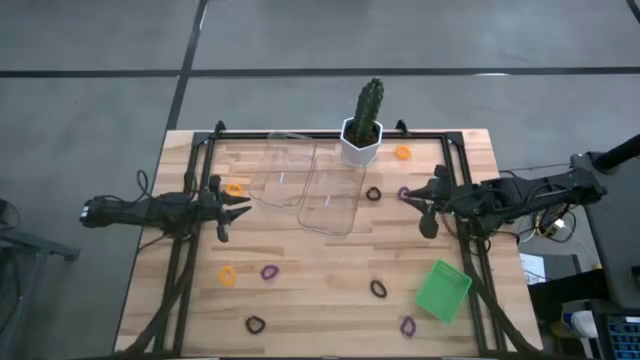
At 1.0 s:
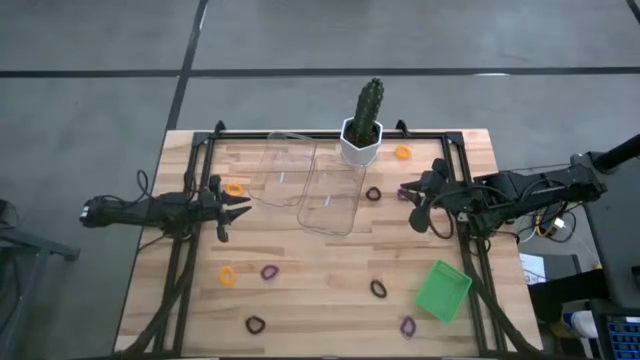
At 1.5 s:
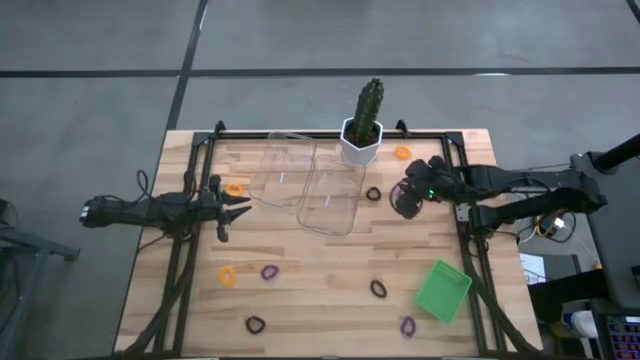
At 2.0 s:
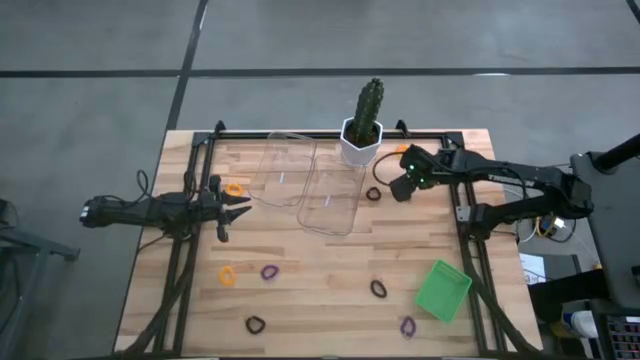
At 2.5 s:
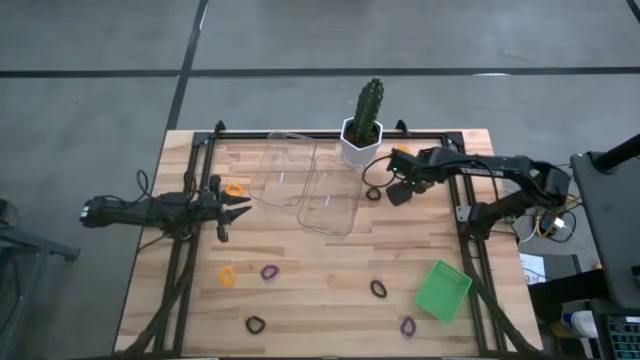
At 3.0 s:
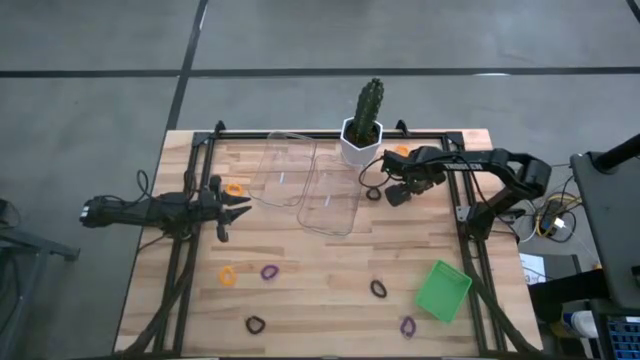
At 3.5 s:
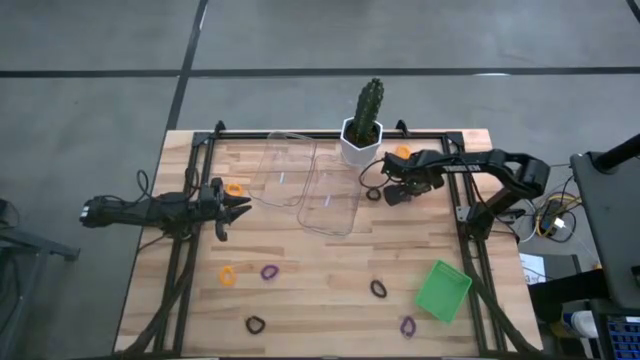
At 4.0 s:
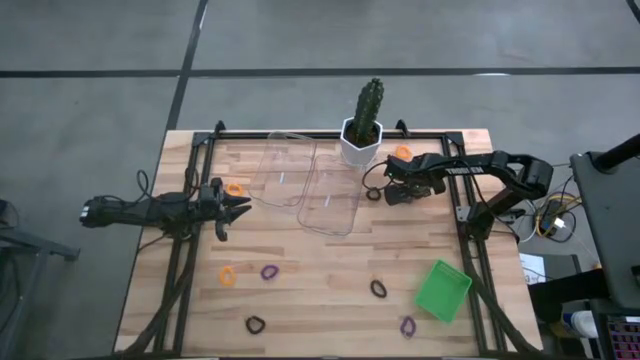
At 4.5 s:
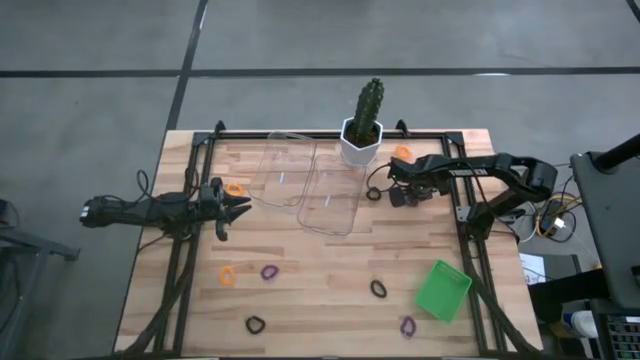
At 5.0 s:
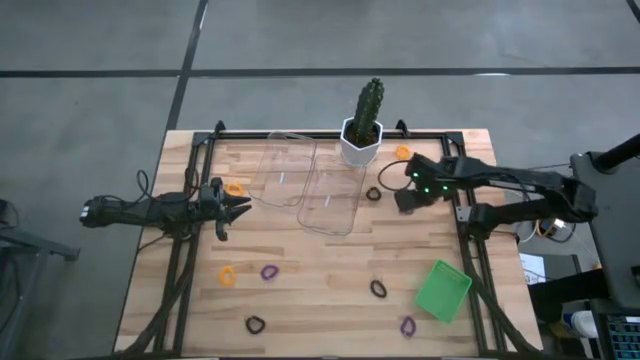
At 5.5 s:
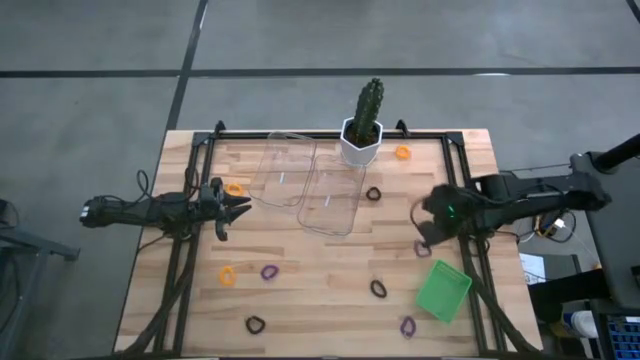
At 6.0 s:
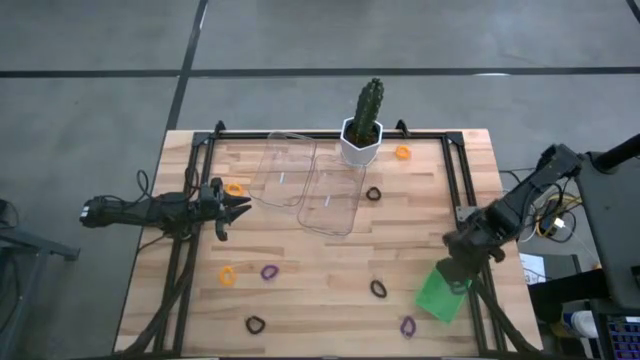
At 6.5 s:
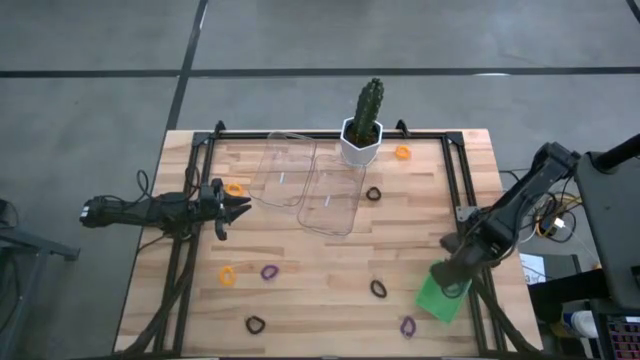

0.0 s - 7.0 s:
Task: Sort items
Put the top right purple keychain into the green bin

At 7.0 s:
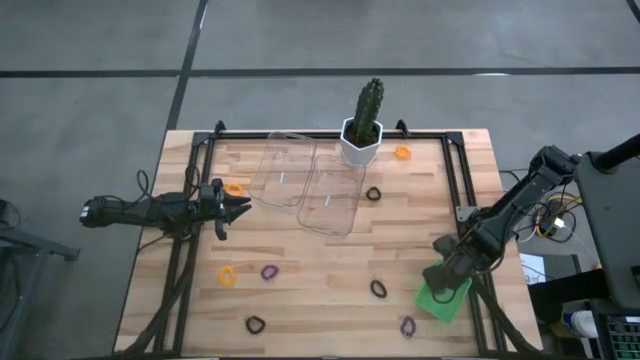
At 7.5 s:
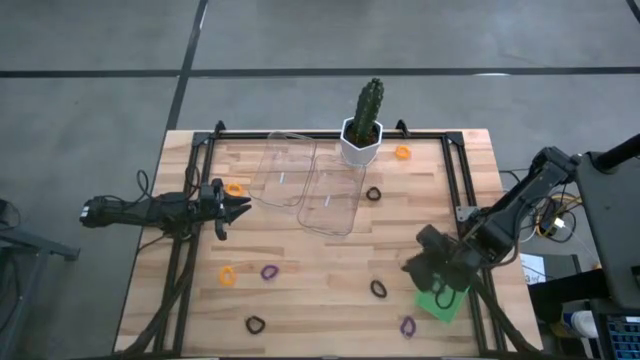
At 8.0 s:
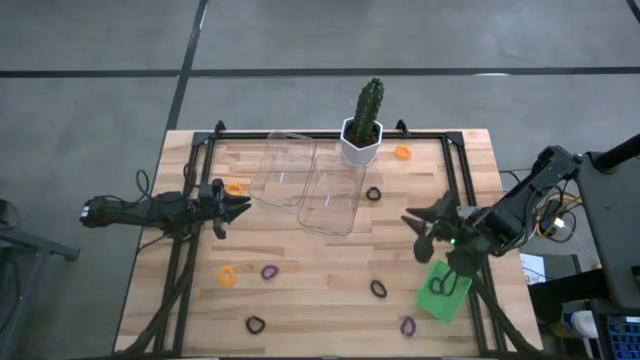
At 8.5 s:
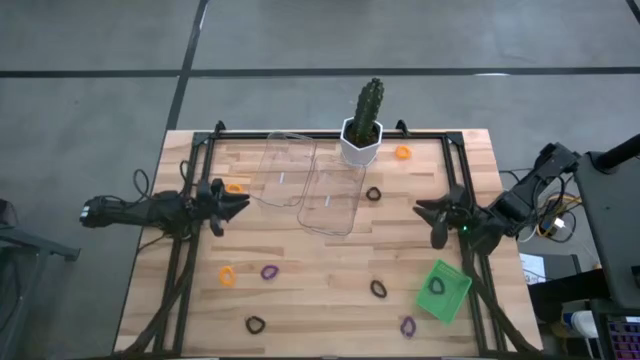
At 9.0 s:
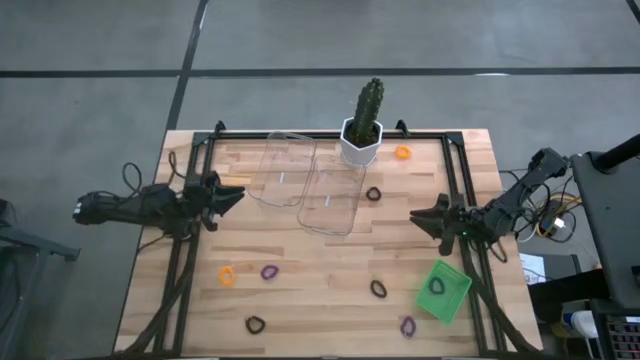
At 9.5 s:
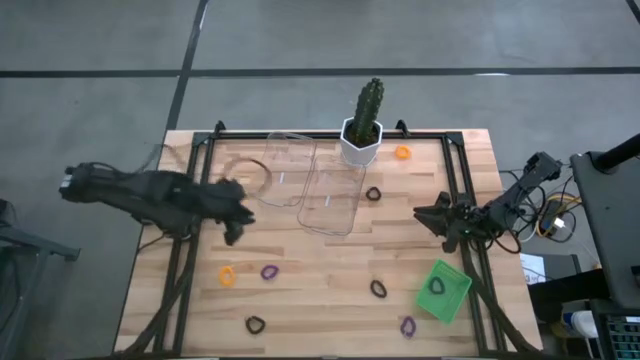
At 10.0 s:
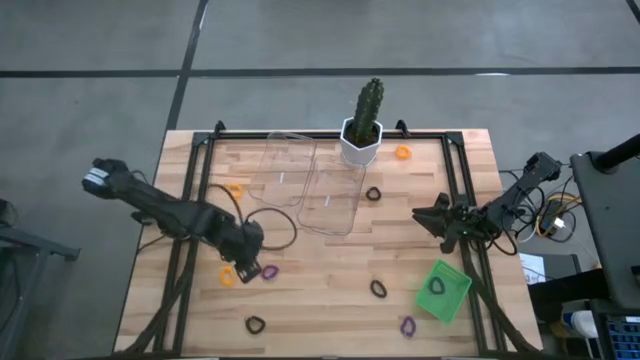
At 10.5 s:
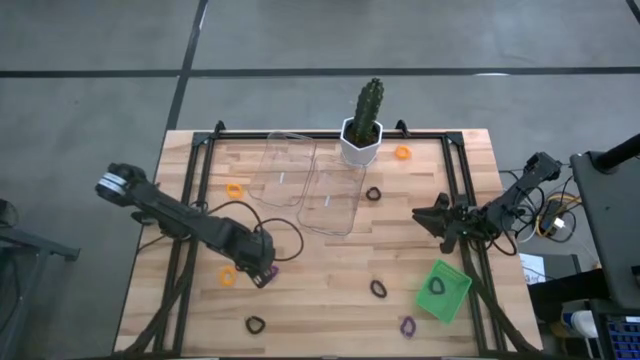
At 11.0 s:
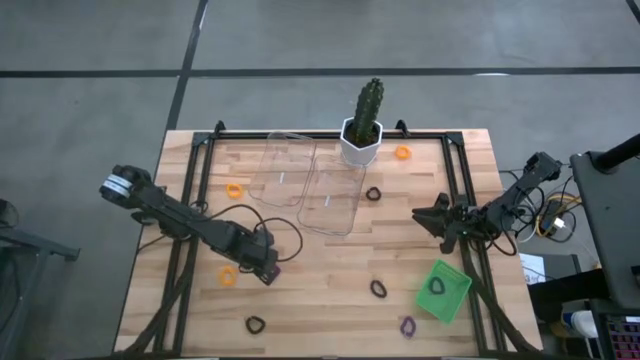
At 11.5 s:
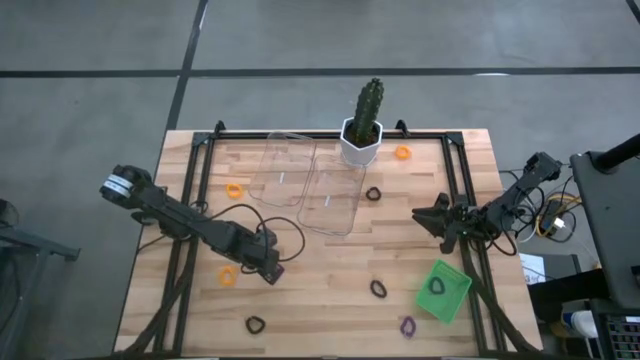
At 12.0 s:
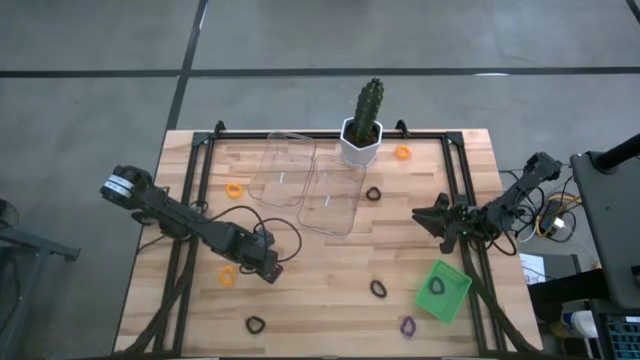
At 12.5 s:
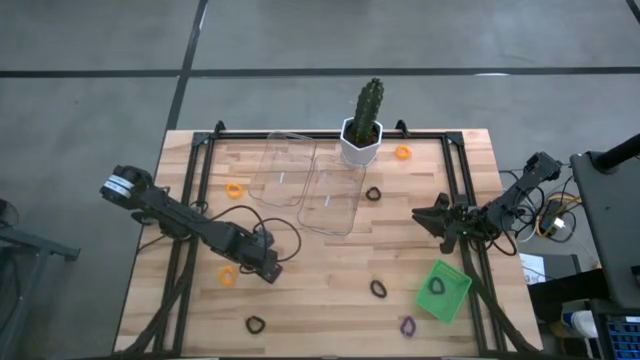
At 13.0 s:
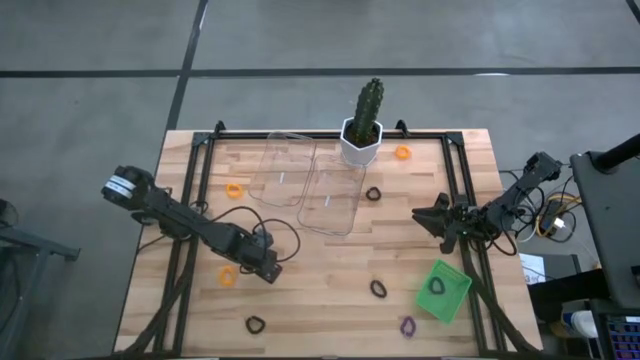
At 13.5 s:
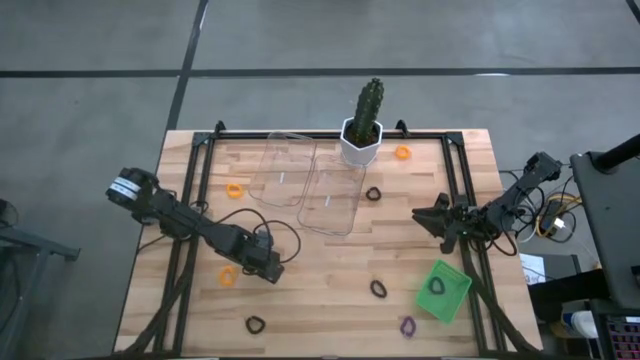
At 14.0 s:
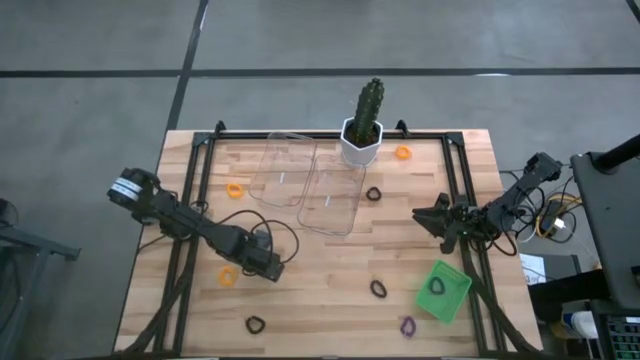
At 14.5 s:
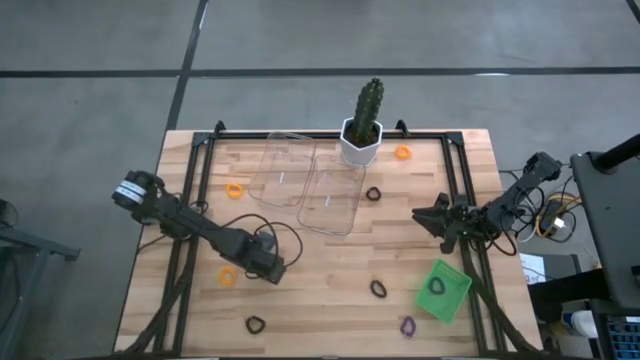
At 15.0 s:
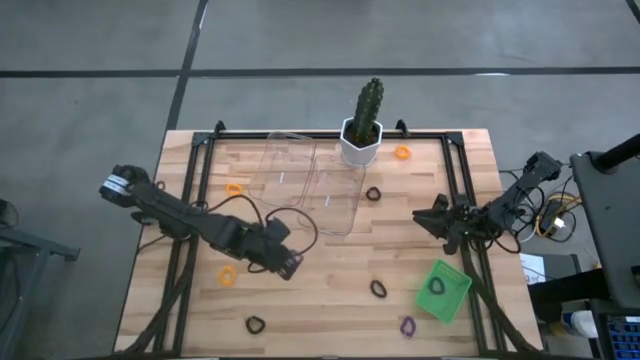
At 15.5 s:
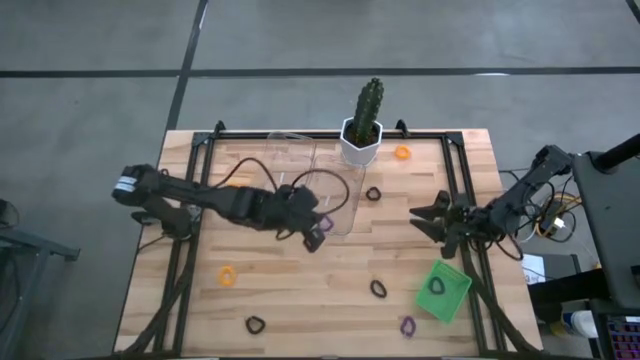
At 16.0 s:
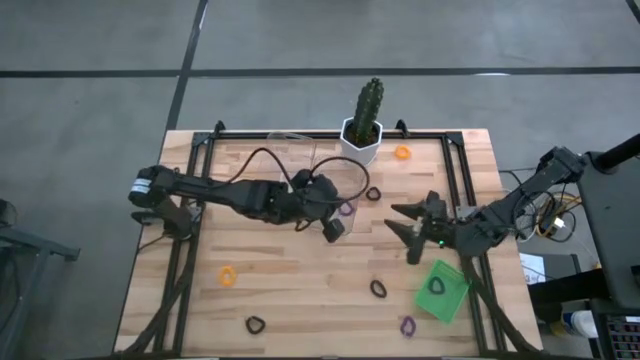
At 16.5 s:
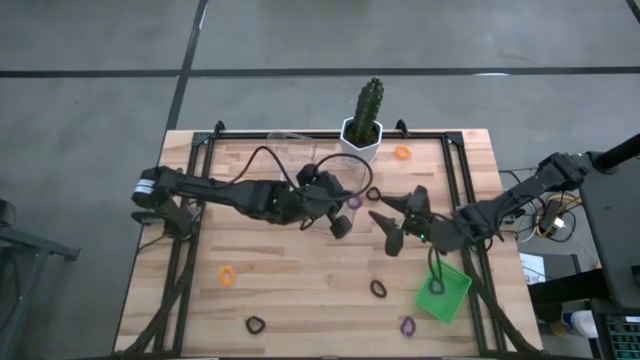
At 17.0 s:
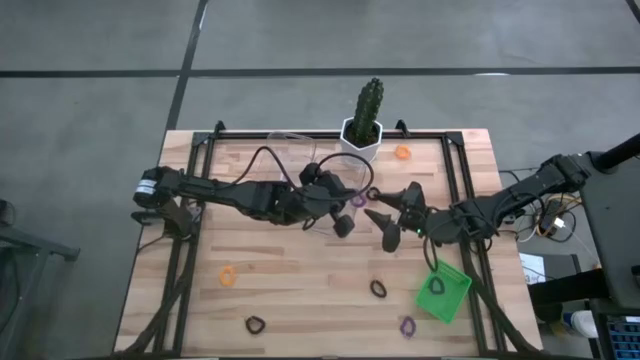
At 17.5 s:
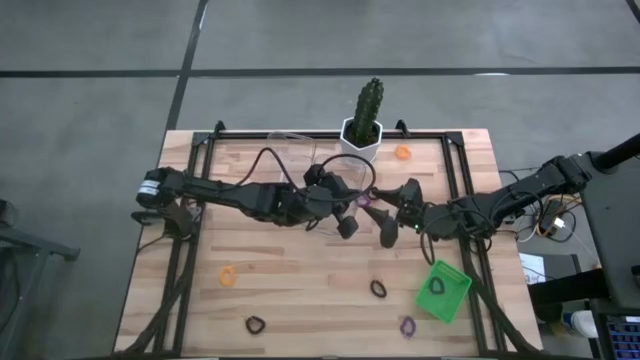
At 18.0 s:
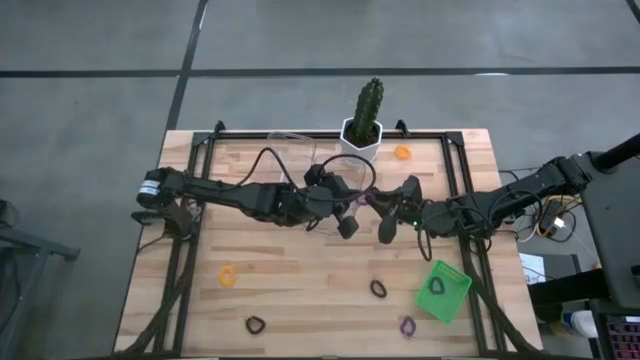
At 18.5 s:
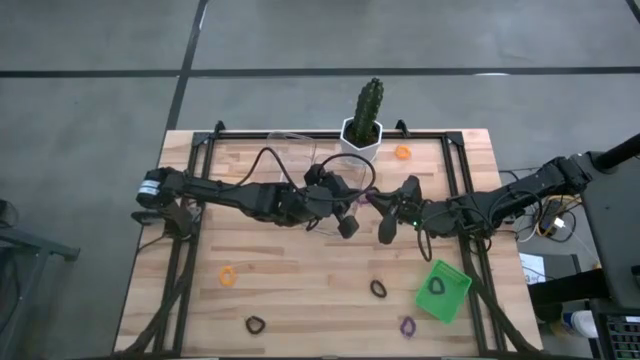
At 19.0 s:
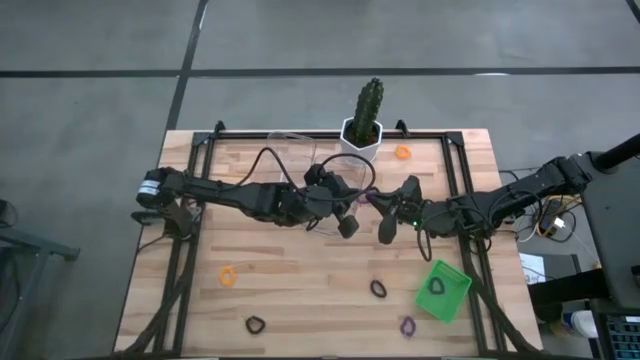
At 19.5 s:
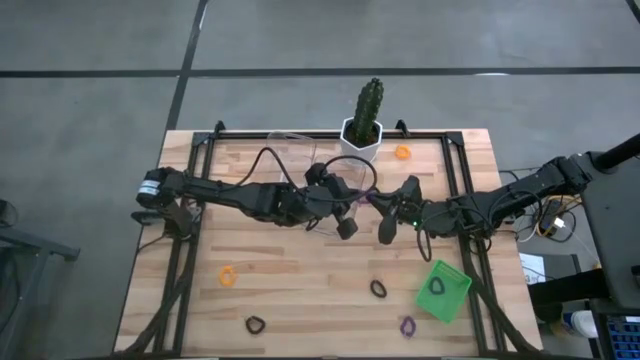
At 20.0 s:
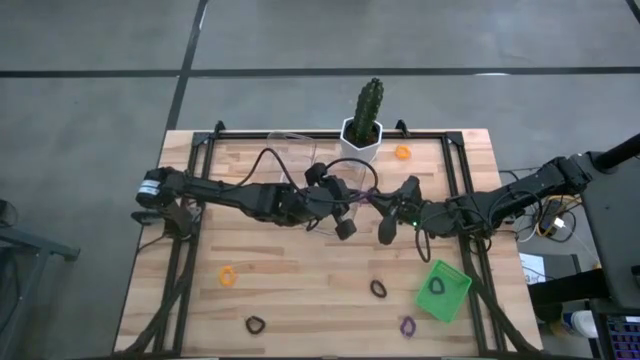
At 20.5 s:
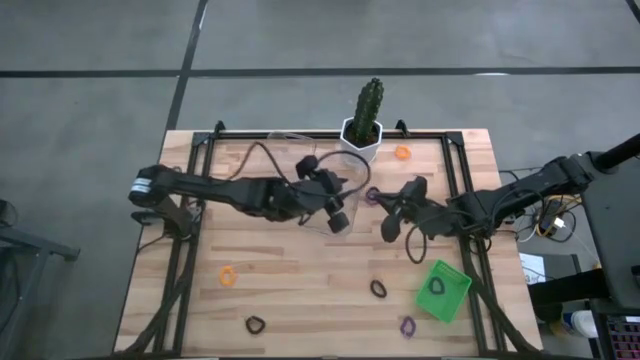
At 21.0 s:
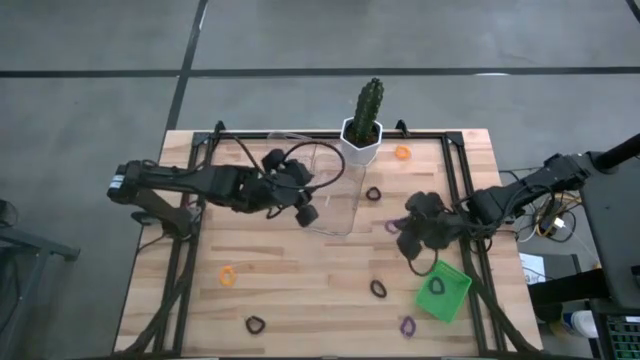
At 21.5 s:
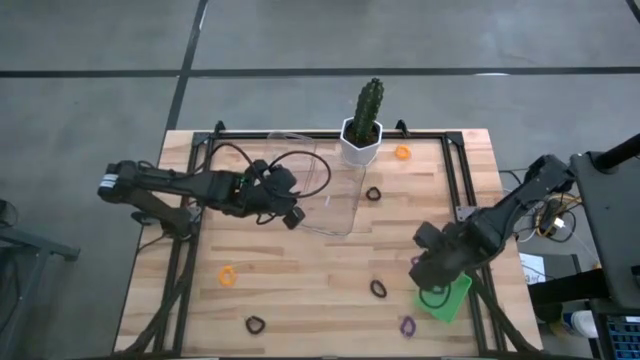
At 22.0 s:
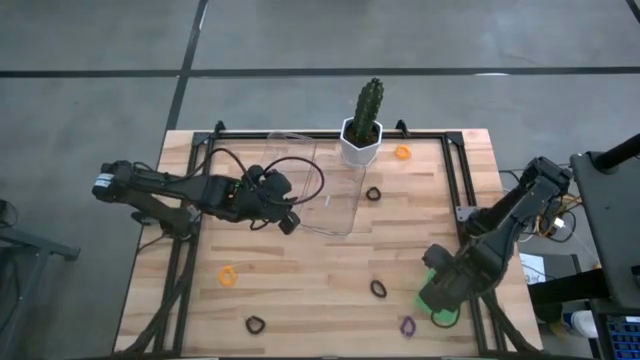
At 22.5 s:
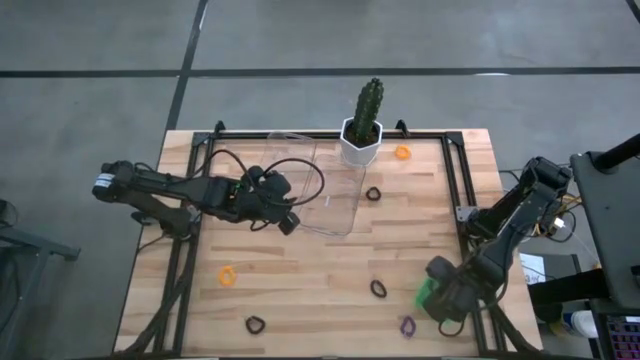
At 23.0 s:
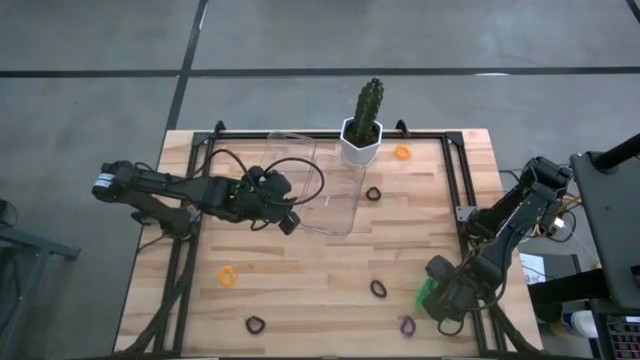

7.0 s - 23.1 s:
Put the left purple keychain into the green bin
